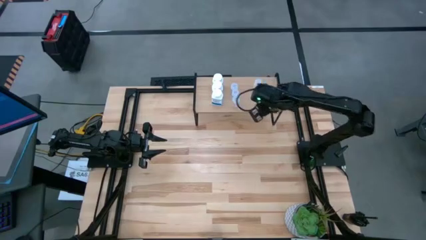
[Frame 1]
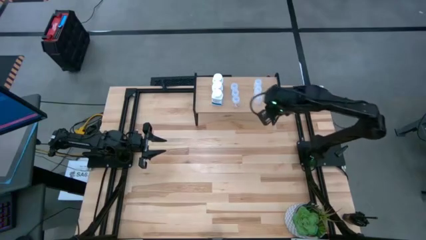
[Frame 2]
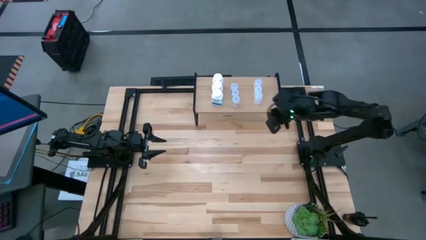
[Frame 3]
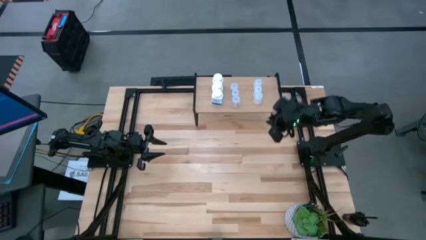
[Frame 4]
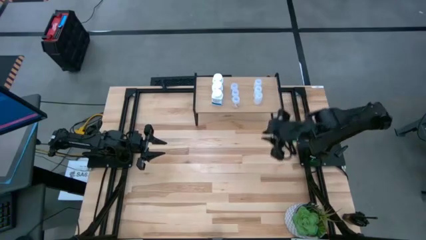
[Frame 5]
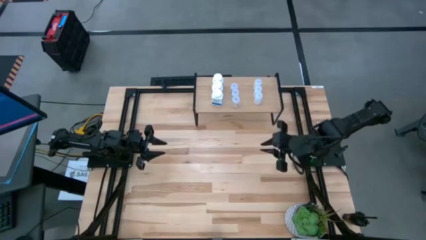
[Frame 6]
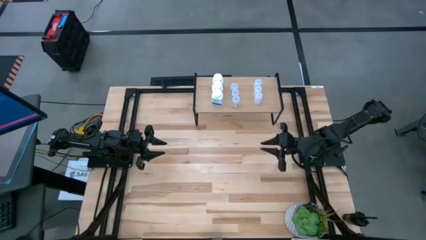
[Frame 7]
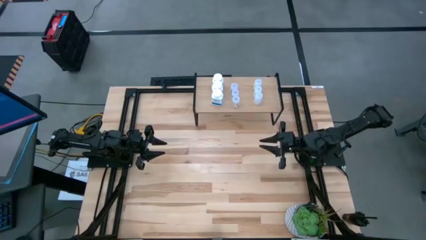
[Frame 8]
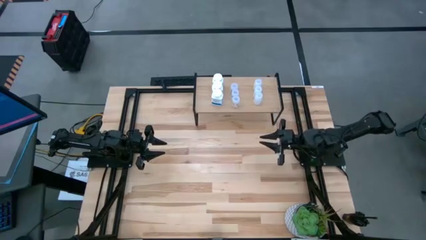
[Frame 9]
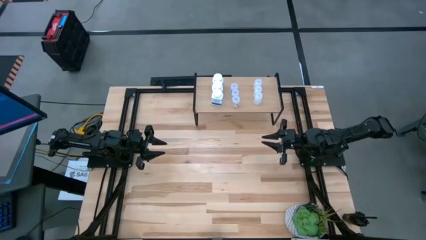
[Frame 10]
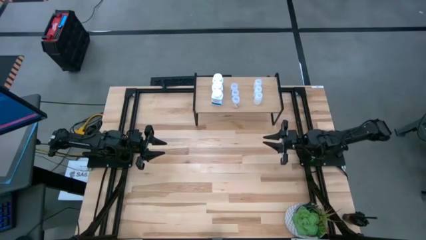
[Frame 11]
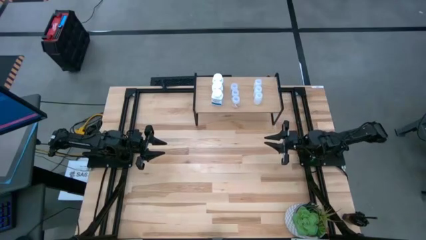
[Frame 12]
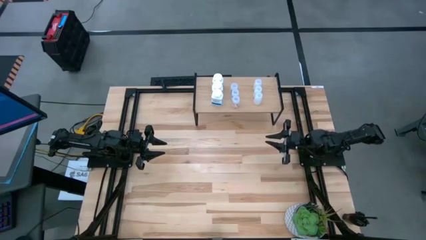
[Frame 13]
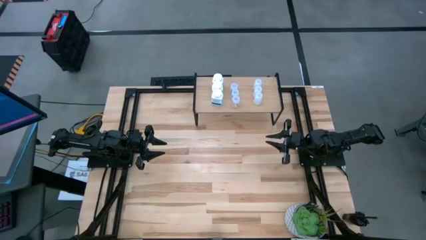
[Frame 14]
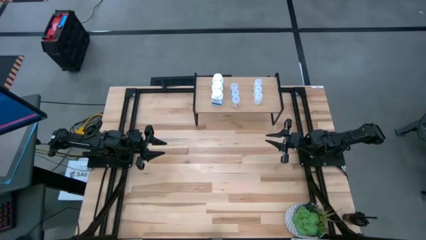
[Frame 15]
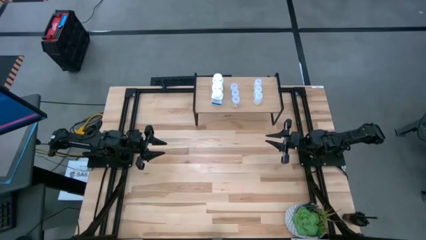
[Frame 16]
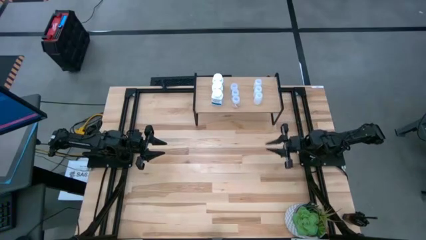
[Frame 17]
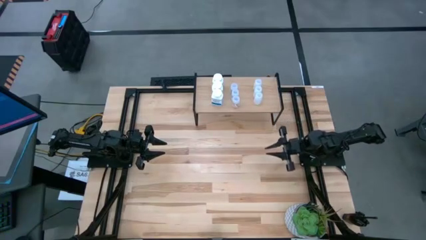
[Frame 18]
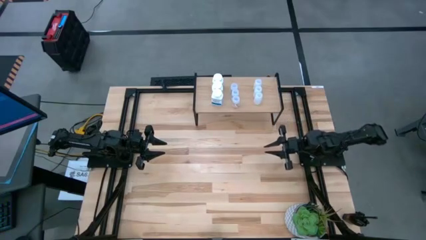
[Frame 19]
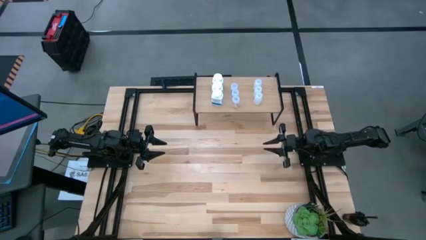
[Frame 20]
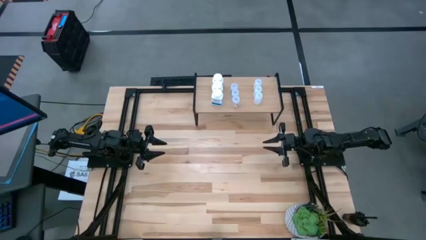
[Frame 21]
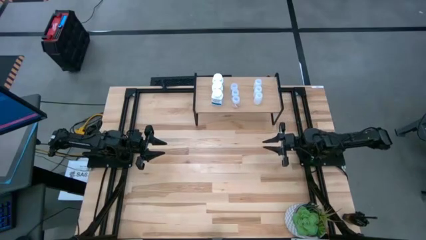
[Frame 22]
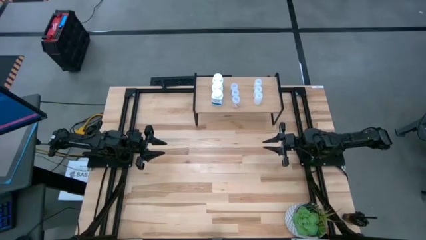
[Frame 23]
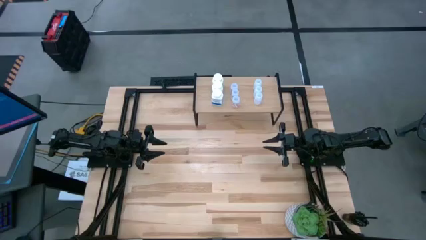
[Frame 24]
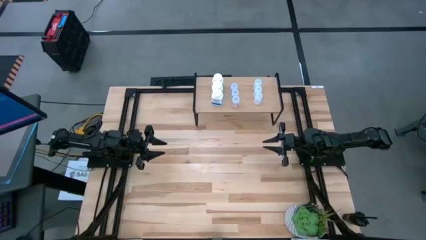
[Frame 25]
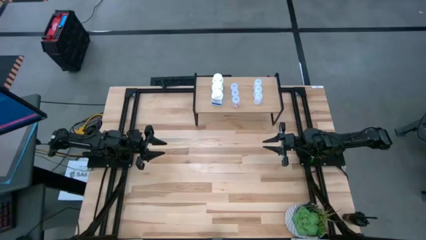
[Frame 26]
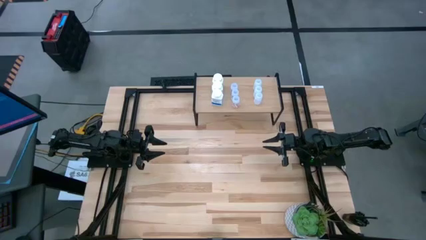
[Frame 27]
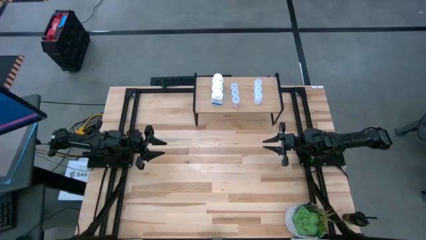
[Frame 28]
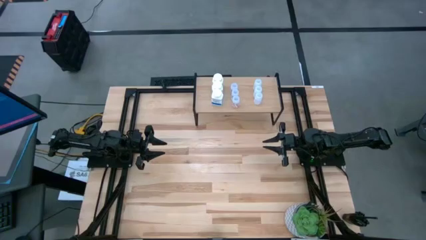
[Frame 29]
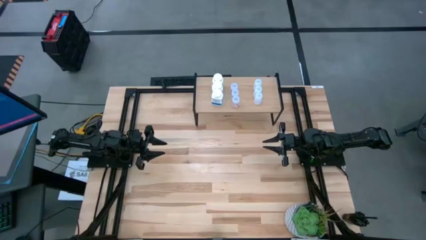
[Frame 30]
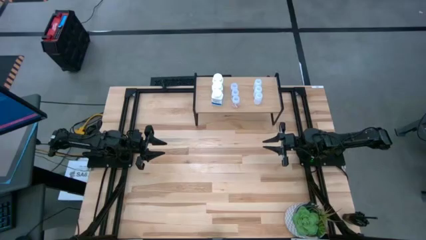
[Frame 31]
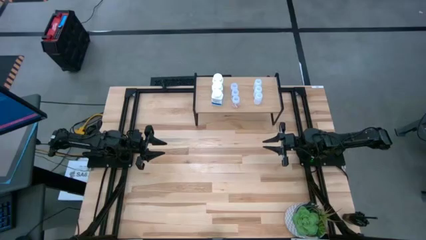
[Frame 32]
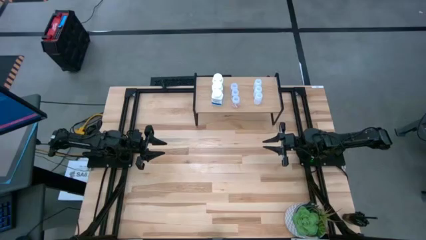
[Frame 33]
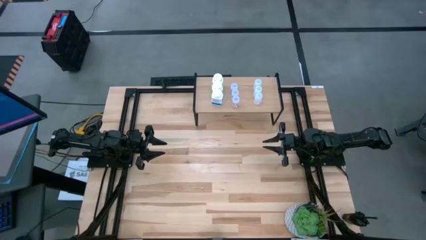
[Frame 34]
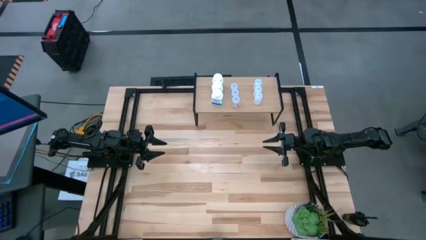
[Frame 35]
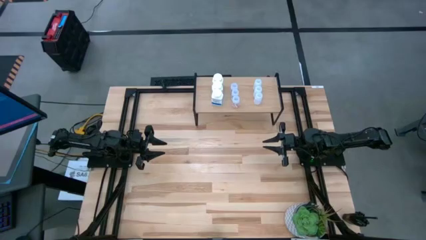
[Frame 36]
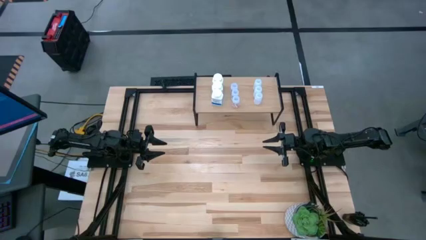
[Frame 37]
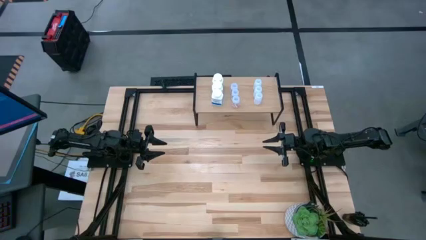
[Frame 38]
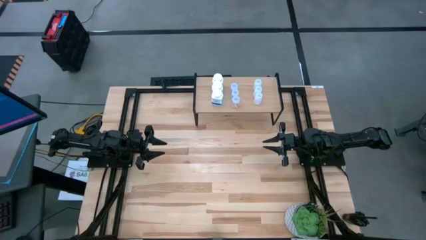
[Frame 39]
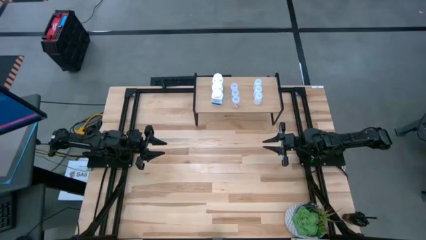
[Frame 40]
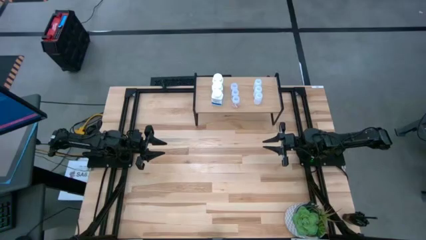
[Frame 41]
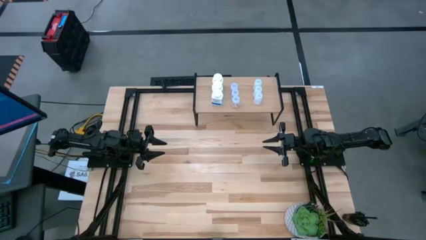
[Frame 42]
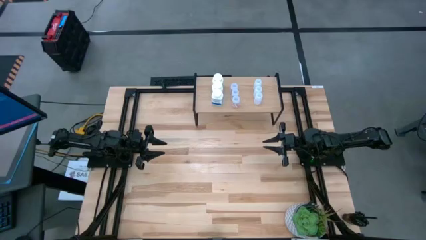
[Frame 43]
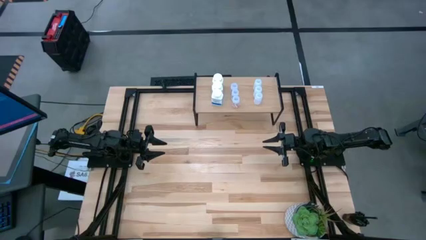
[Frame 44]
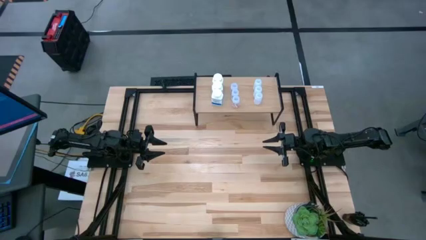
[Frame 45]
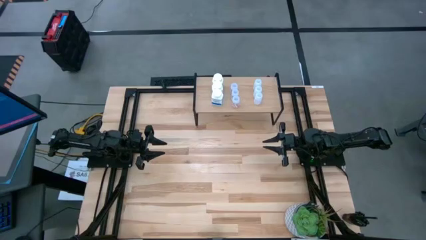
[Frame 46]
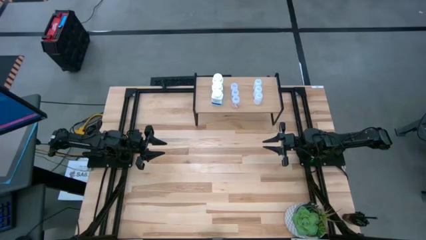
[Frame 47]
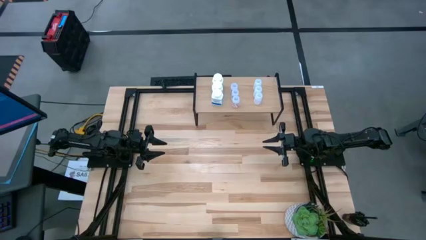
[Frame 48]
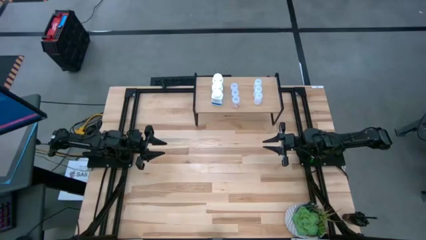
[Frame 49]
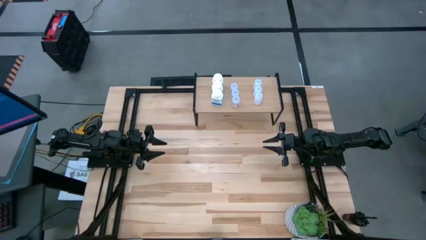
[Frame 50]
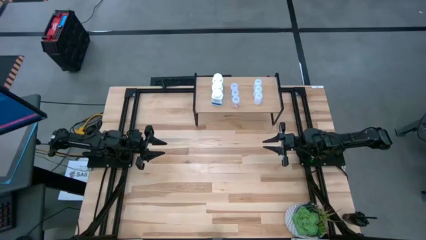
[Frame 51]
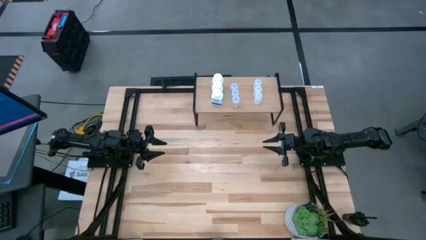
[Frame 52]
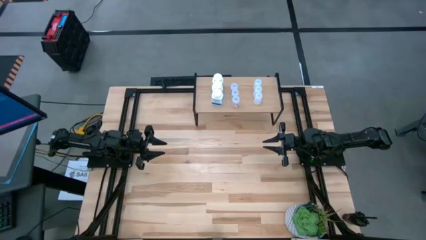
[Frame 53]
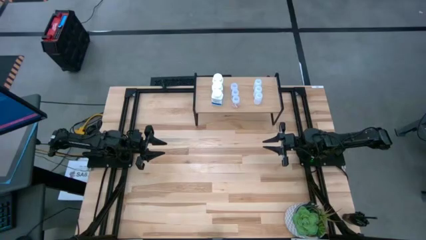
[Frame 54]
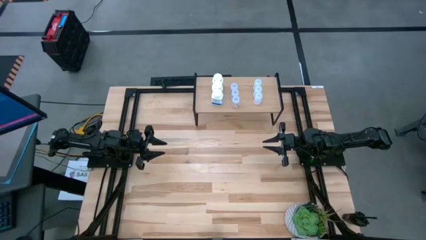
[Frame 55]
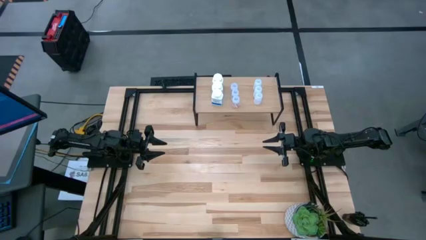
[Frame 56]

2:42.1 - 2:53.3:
Task: Pick and place medicine bottles onto shelf by color
Return to Home Position

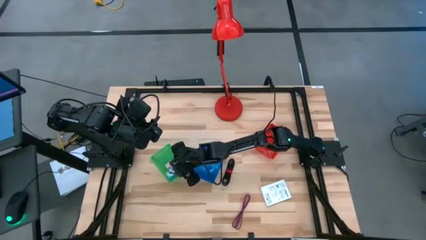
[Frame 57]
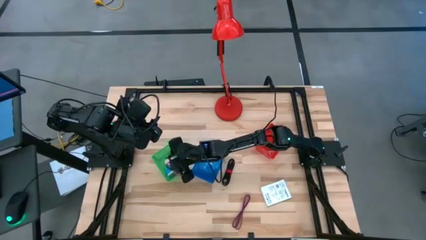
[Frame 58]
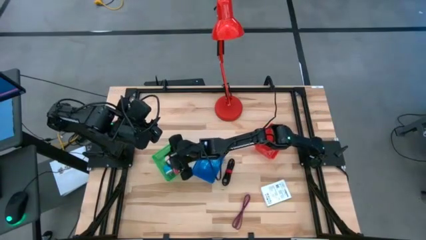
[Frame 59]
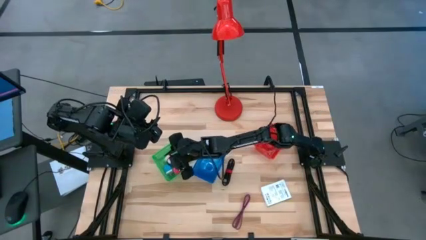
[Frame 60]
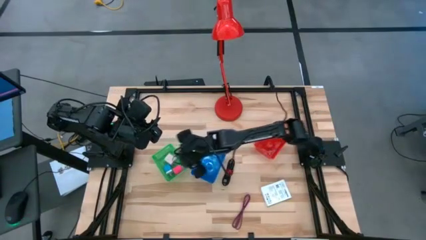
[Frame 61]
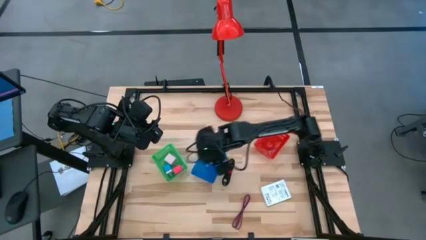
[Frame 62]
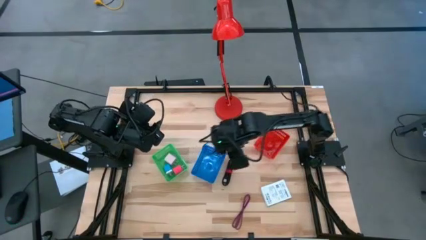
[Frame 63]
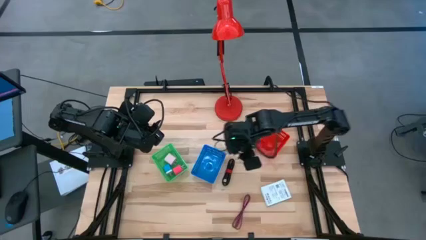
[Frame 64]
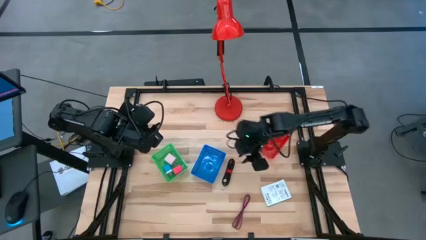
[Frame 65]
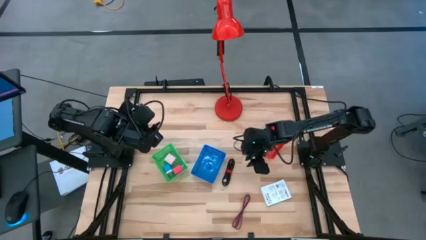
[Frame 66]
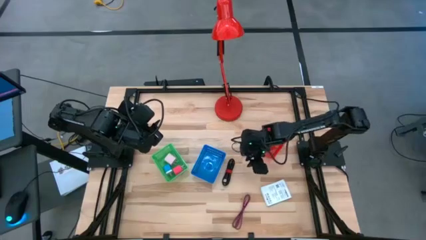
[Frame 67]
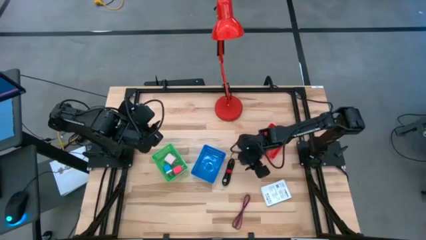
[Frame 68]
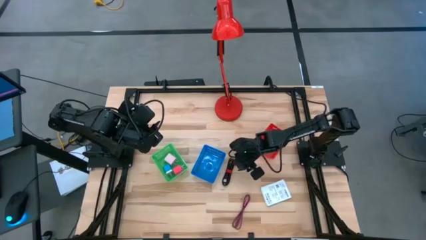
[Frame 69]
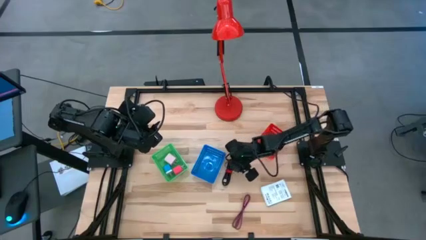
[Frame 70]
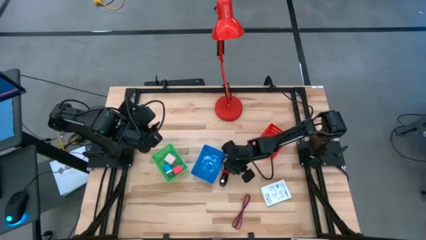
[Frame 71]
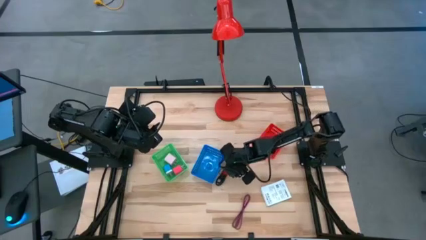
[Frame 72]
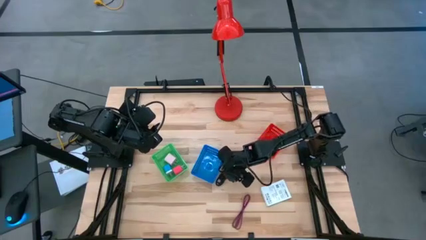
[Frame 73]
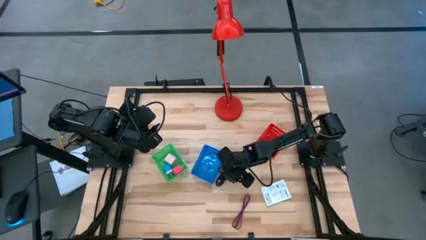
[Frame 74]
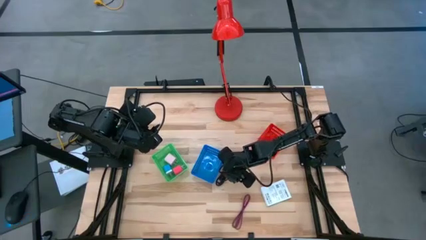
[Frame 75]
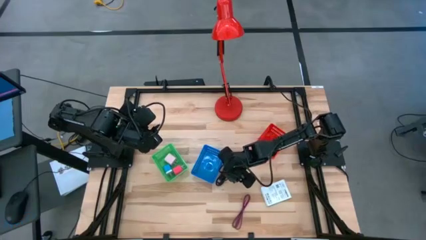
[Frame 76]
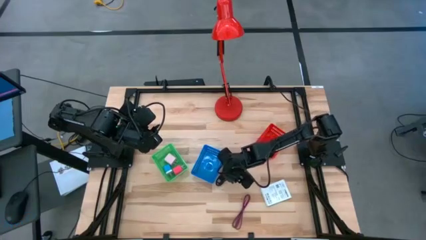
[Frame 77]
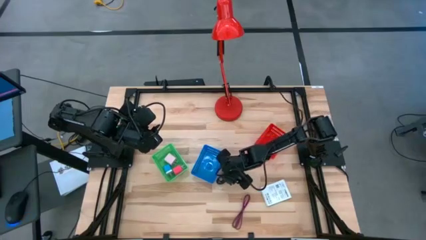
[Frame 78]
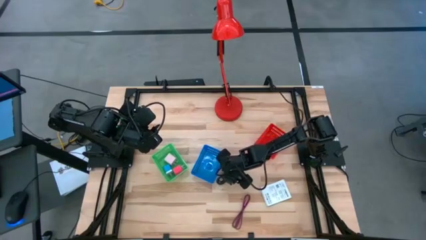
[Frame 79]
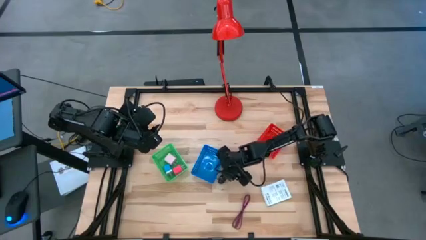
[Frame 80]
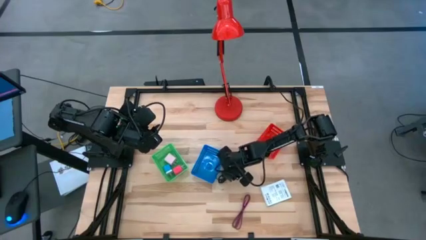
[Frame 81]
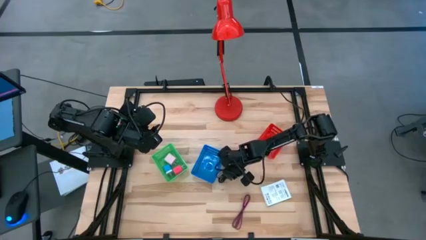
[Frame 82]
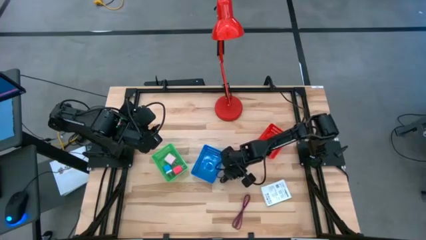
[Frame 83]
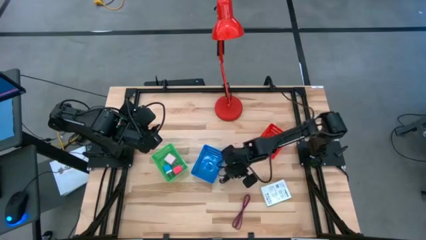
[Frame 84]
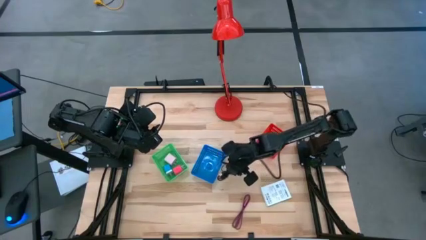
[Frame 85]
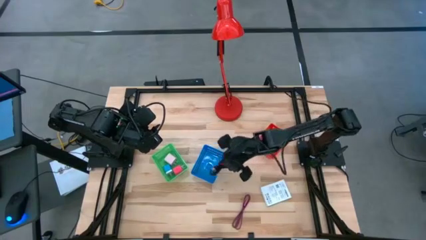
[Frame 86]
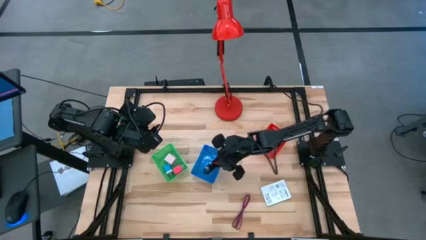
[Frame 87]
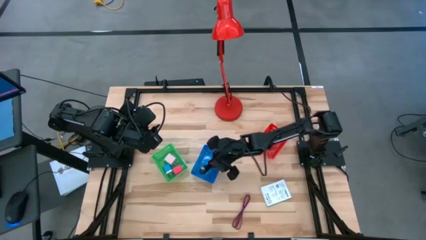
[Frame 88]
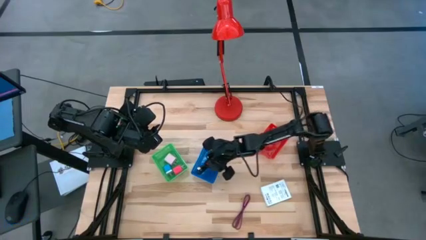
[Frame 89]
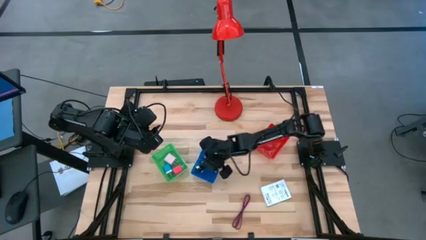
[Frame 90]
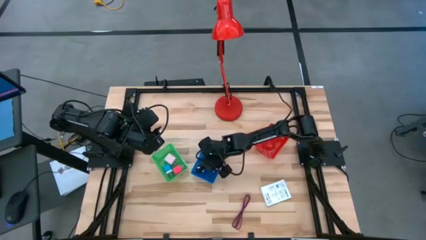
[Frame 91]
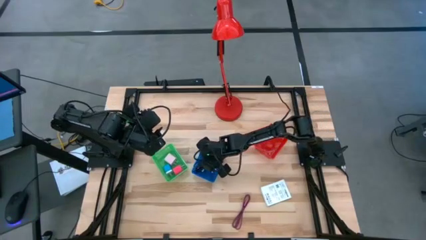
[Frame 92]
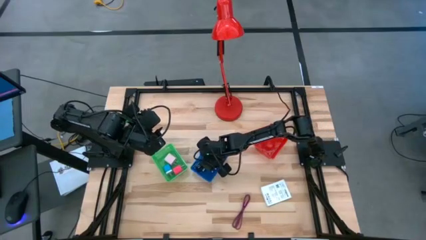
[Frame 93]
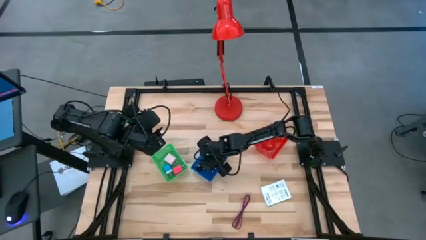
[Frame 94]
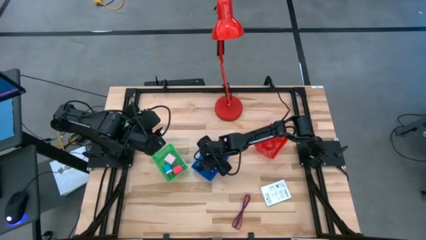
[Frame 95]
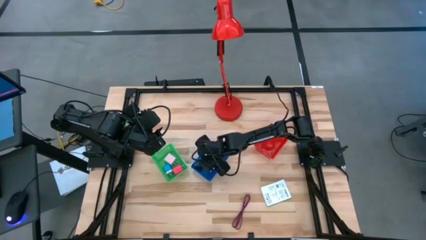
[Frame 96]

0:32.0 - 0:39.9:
Task: Pick and place items into bin
Put the black charger cable into the blue basket
